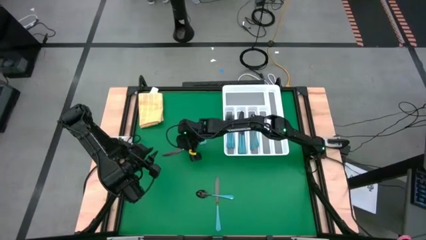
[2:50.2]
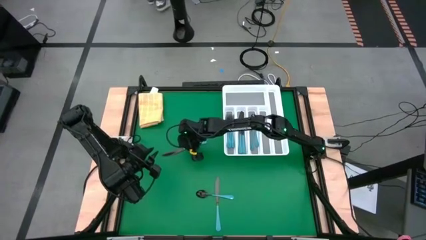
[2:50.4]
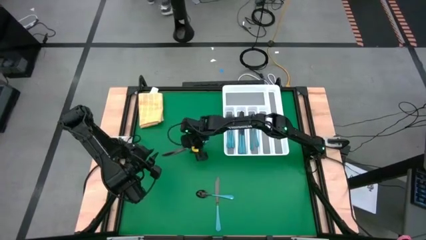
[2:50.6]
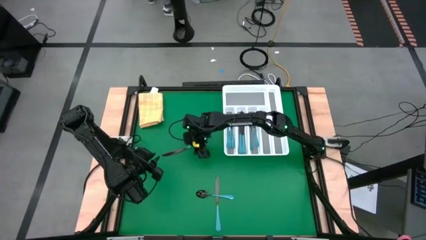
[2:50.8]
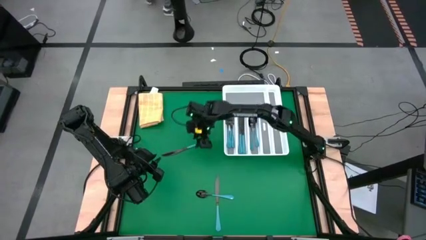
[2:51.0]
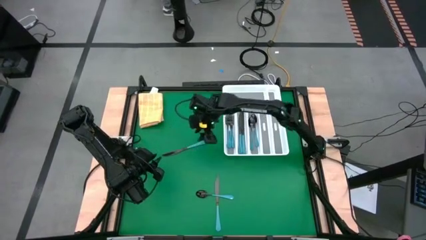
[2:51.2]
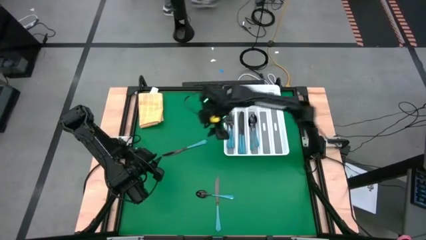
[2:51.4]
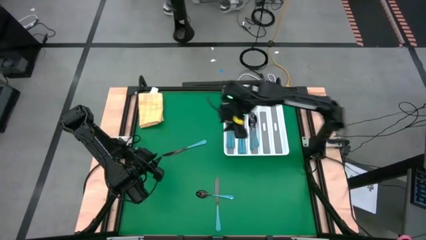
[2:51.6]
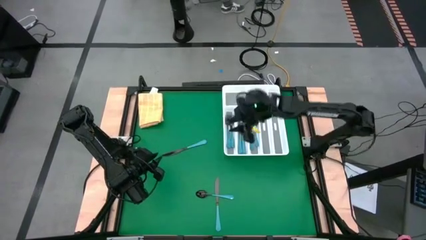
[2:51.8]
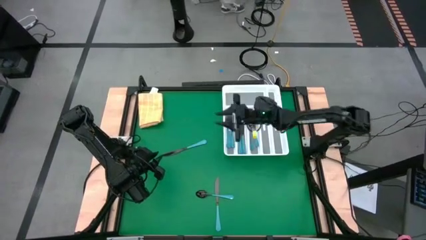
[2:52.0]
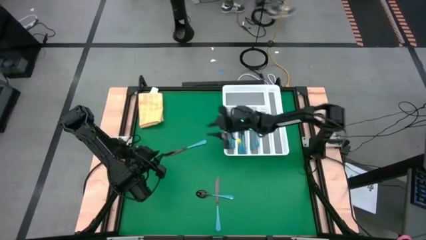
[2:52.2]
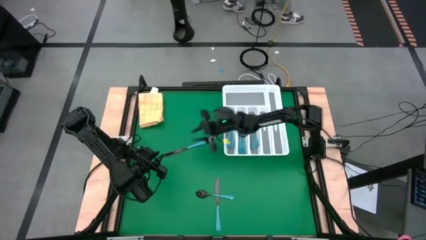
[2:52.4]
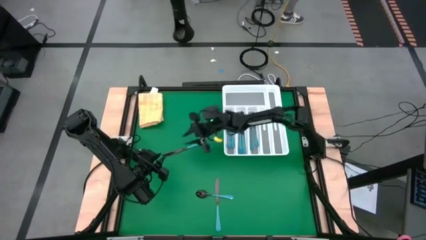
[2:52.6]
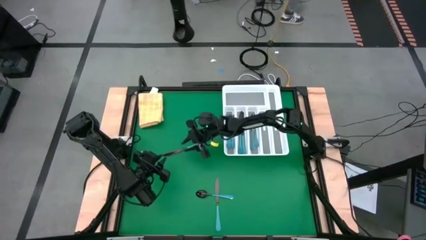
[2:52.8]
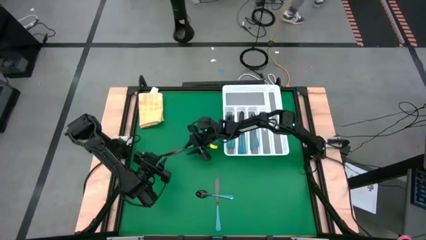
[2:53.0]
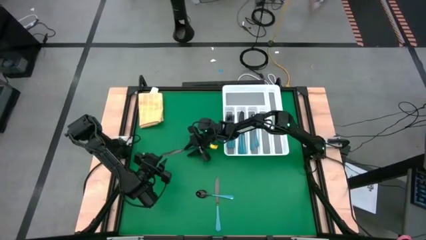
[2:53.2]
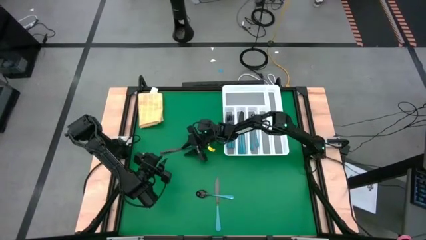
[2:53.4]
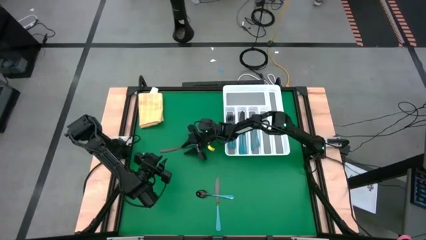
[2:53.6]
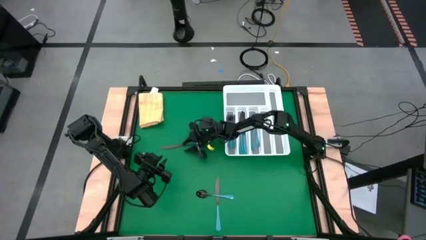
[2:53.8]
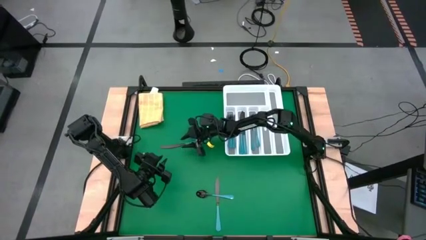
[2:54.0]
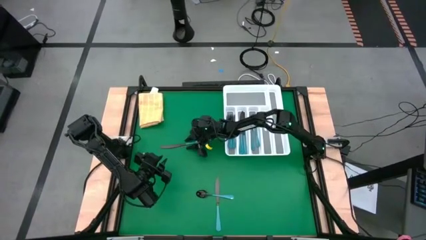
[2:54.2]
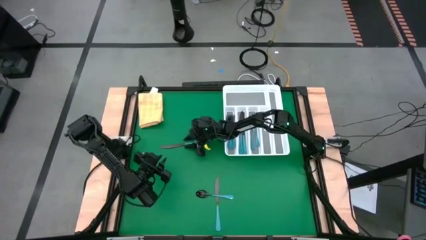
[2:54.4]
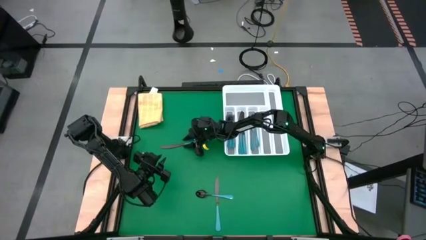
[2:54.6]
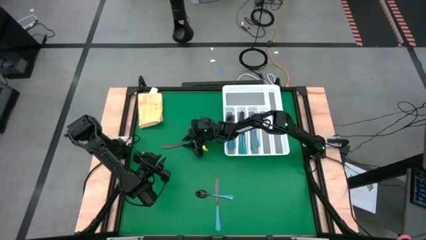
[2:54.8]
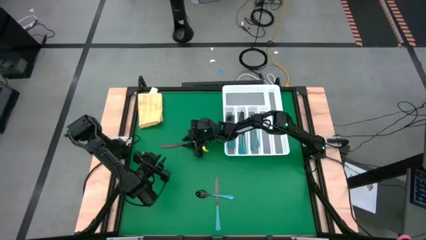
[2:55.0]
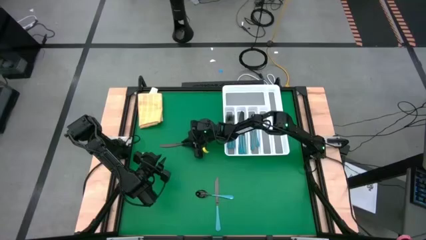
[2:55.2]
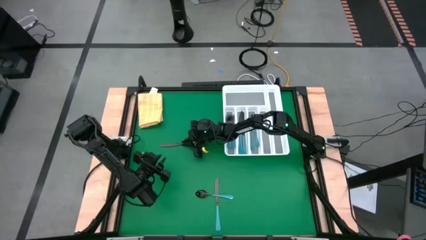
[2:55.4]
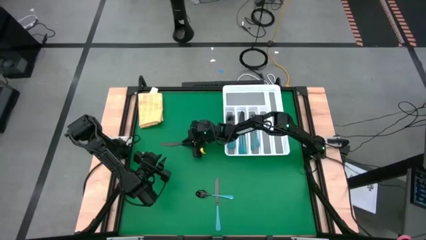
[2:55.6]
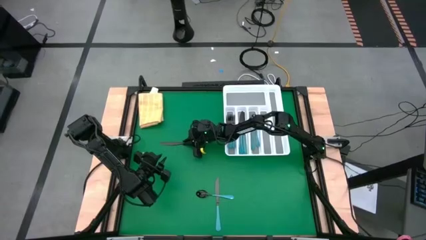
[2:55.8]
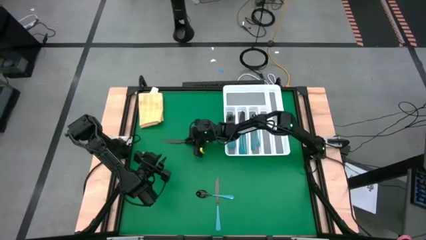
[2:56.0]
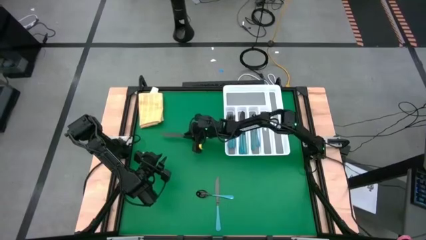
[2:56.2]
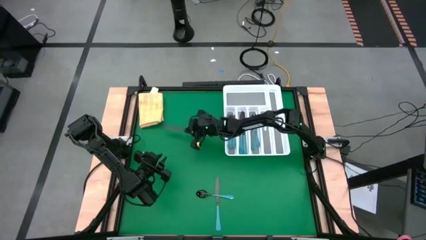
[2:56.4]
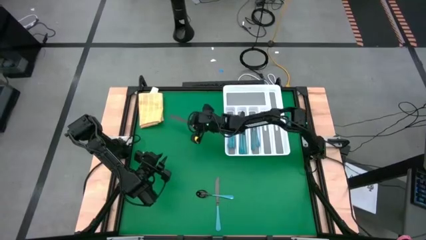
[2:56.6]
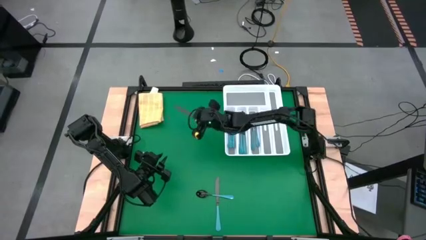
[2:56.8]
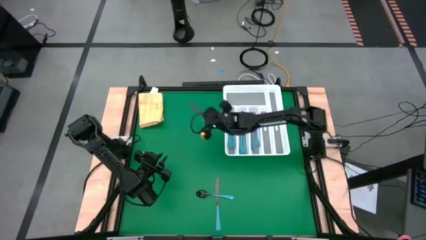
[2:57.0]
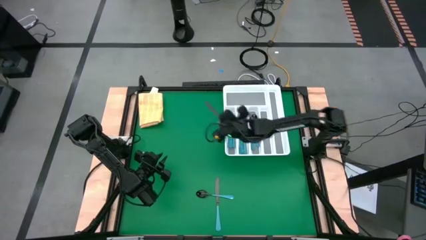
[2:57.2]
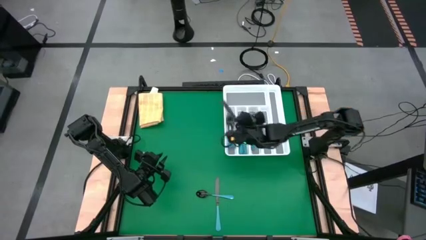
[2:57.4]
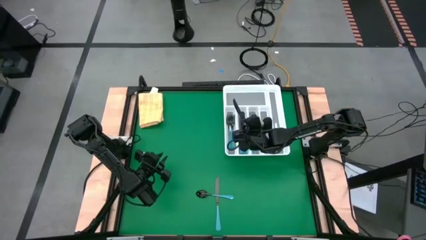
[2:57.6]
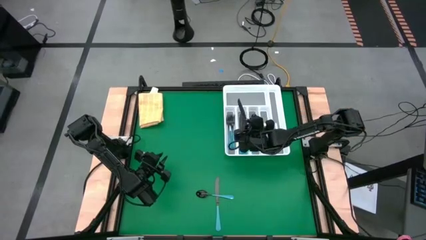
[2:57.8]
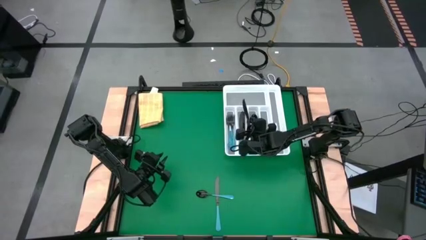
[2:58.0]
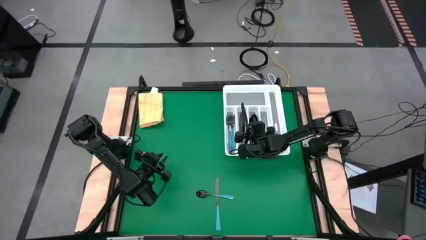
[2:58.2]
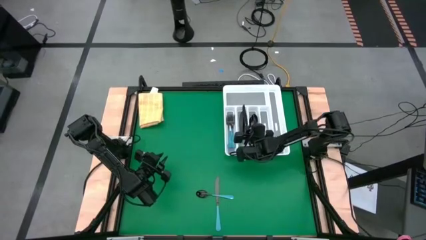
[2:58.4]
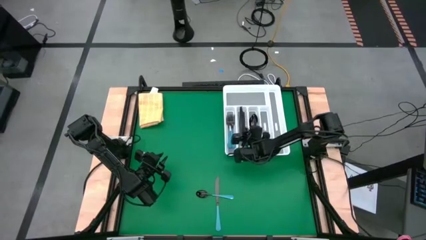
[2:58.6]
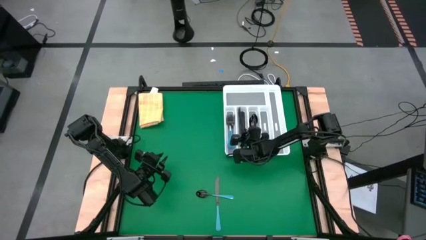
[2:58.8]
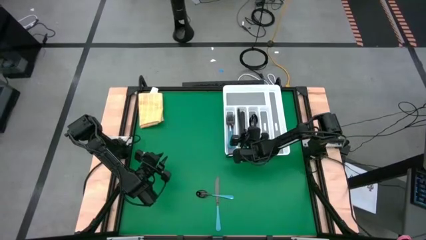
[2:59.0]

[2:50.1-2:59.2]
Task: Sort silverware
Put the blue table knife into the silverware organizer

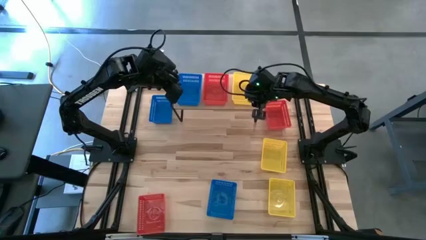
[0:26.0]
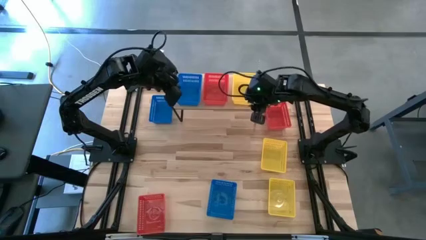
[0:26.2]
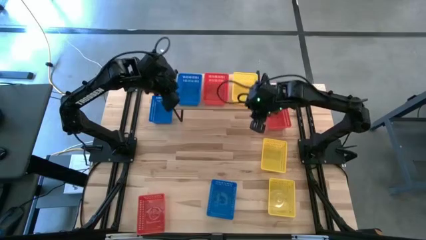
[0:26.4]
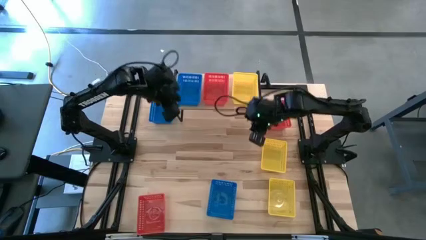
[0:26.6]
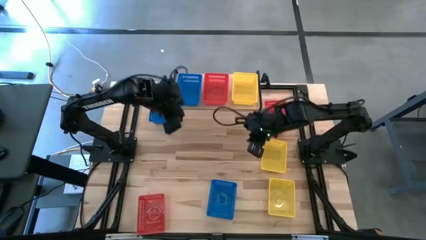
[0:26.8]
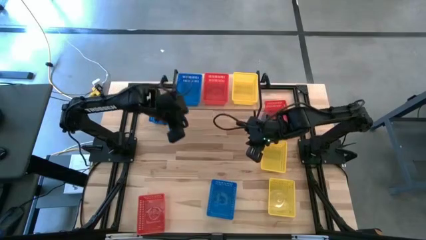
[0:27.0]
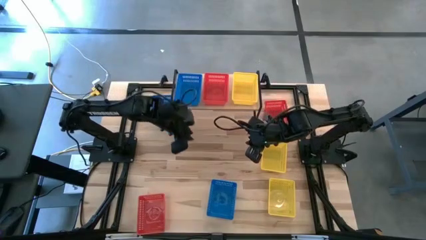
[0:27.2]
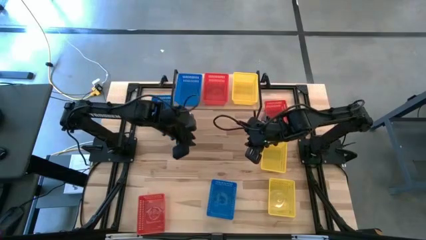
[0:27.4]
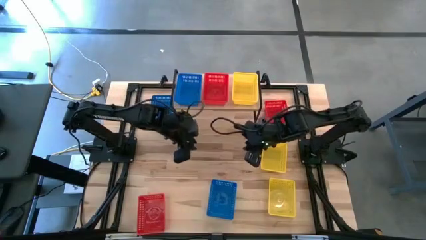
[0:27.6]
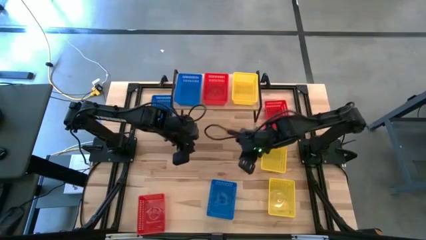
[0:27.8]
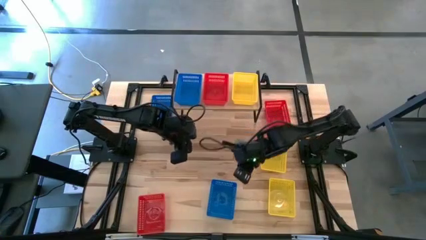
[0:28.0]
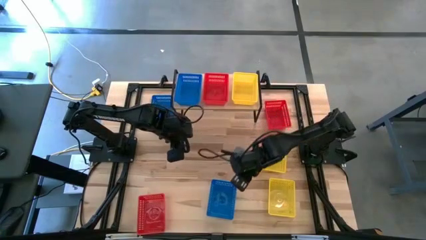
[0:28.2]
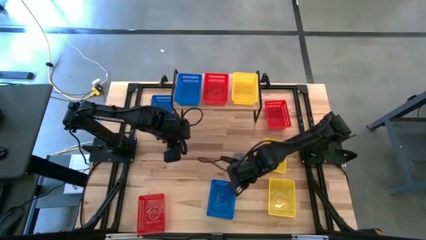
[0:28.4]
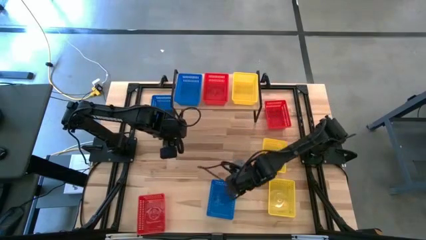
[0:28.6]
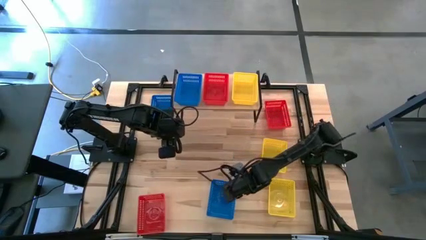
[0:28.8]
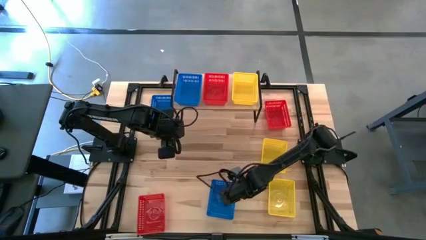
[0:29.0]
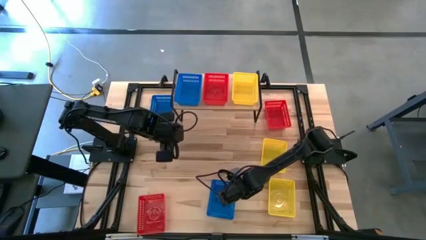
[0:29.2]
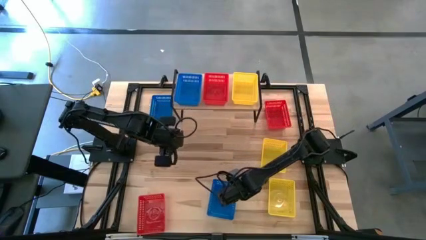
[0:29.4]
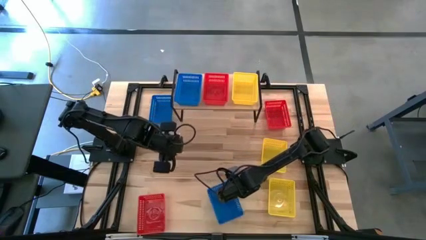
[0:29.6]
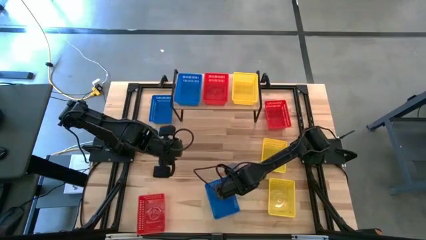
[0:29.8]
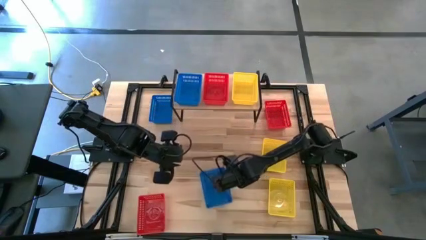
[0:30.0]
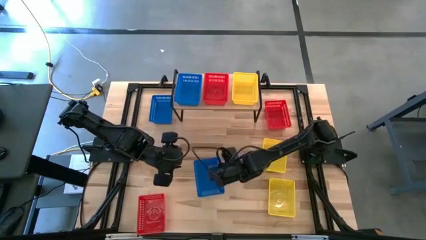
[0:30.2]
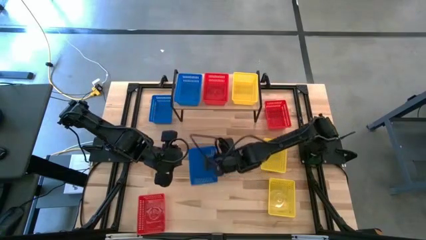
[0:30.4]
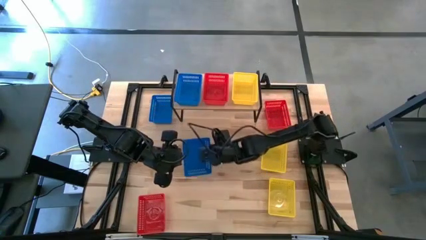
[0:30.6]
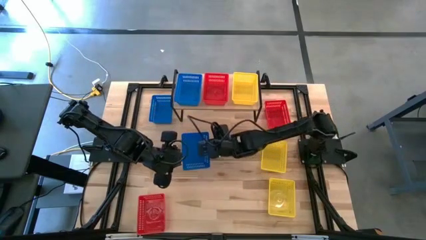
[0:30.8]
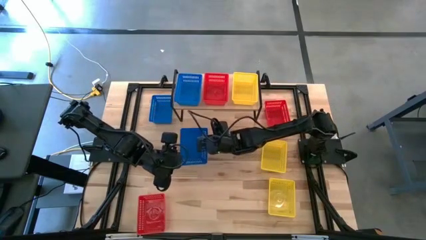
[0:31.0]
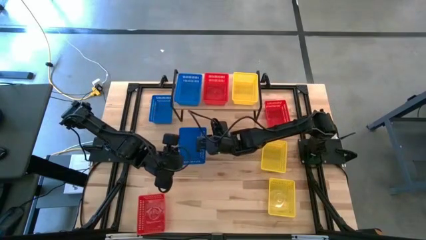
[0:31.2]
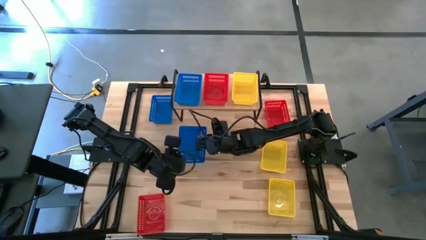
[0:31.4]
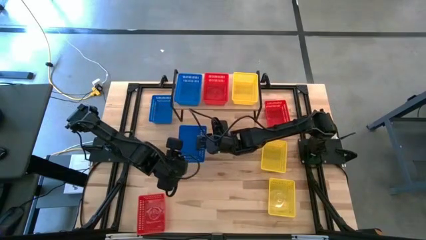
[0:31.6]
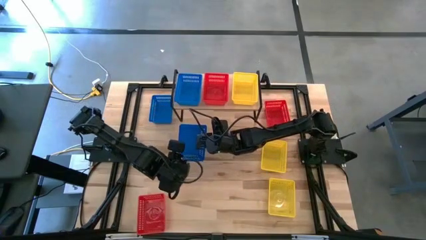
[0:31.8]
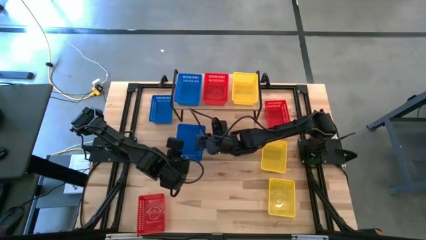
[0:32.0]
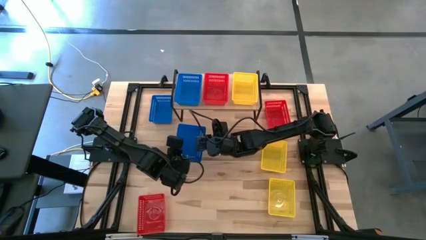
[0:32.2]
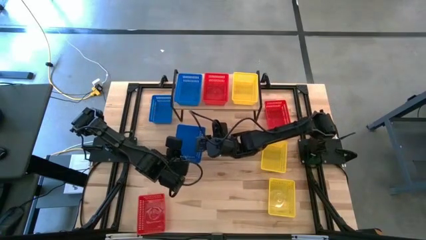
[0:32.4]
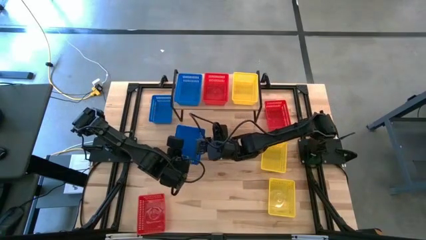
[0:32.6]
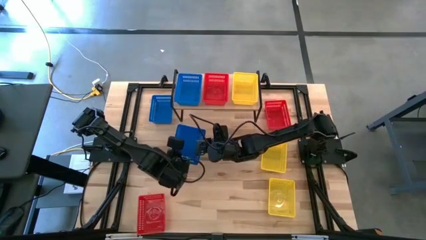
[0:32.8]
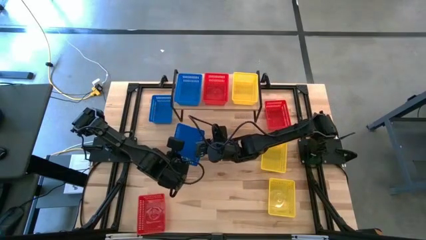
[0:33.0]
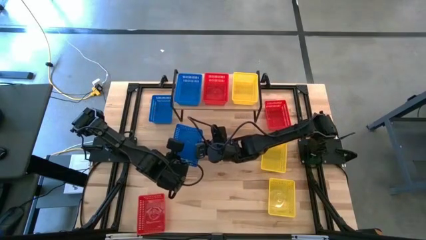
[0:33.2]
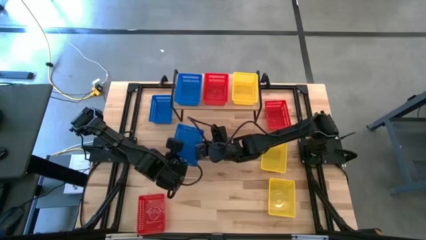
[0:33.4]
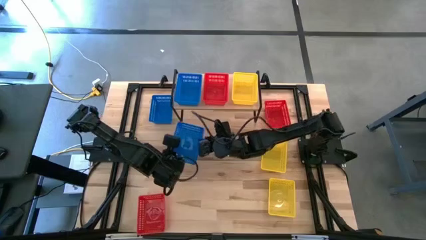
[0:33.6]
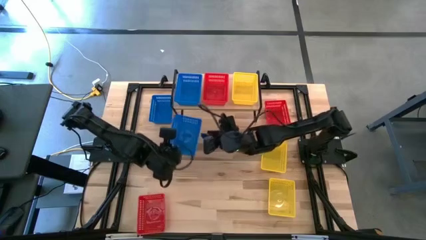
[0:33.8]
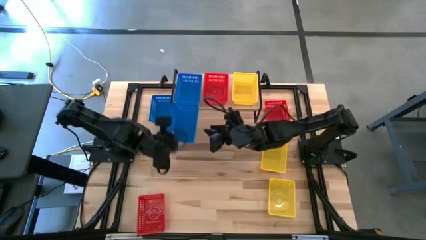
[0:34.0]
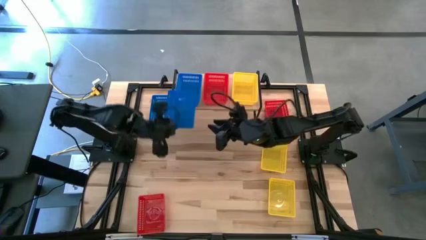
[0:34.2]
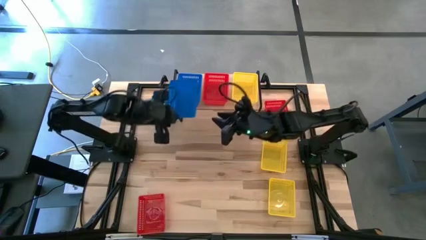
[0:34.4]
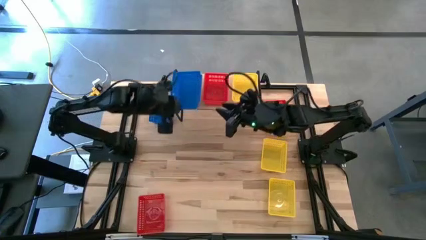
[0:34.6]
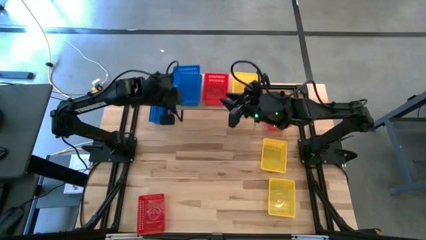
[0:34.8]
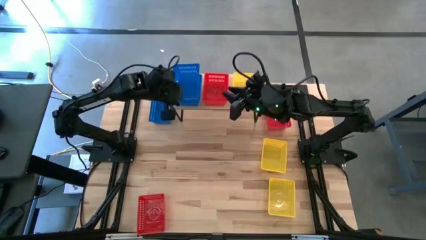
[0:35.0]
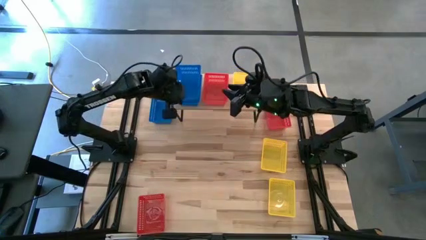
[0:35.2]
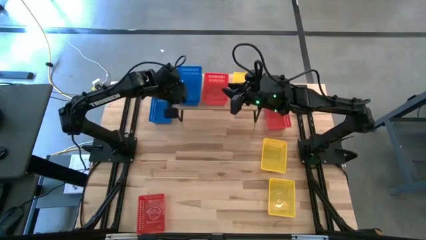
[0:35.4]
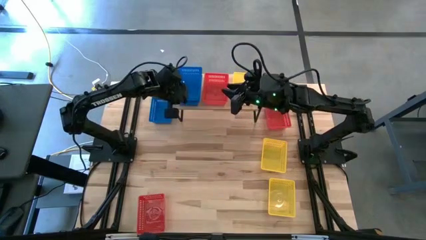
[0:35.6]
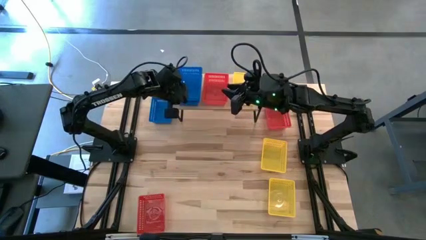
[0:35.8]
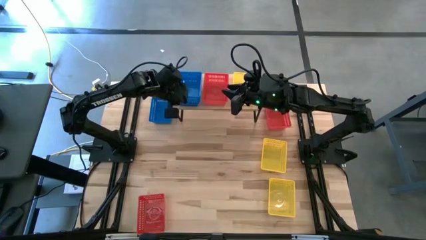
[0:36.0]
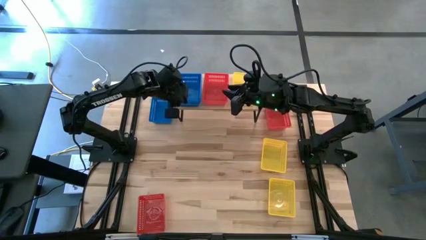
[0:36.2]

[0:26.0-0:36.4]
Task: Stack baskets on shelf by color
Stack the bottom blue bin on top of the blue bin on the shelf
